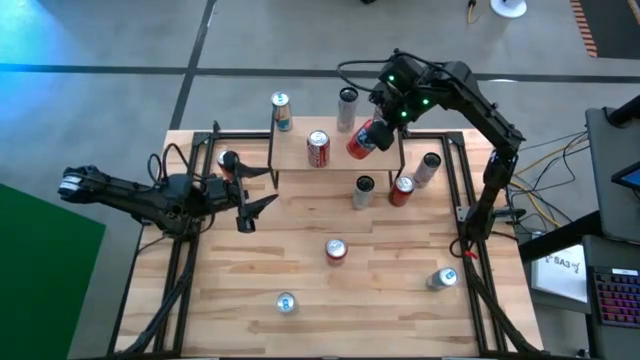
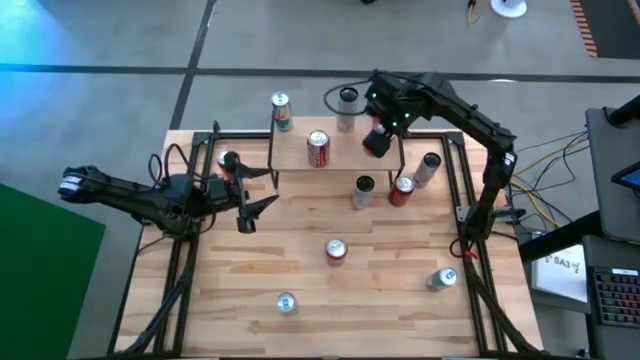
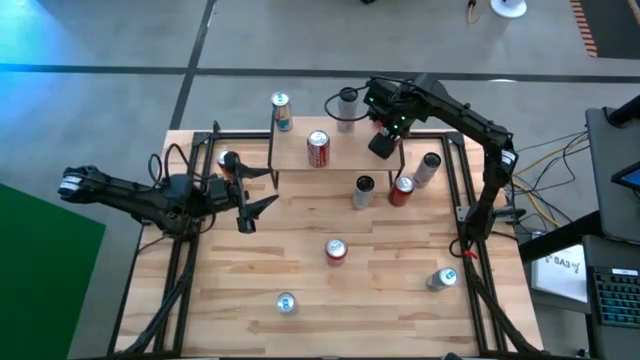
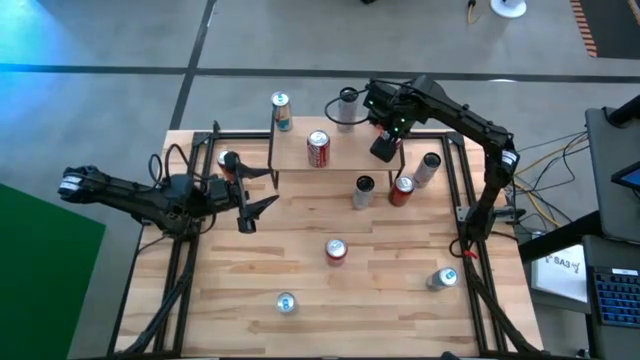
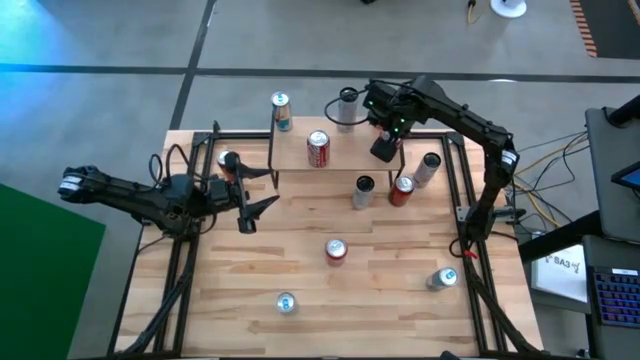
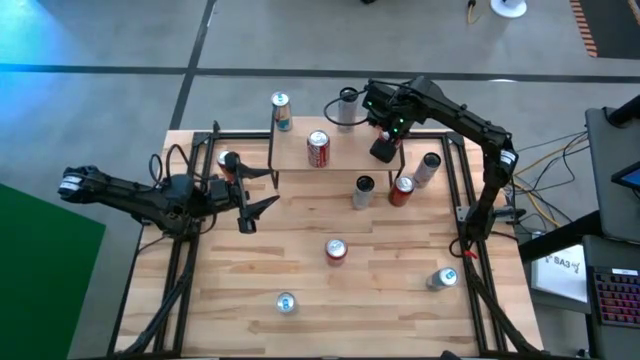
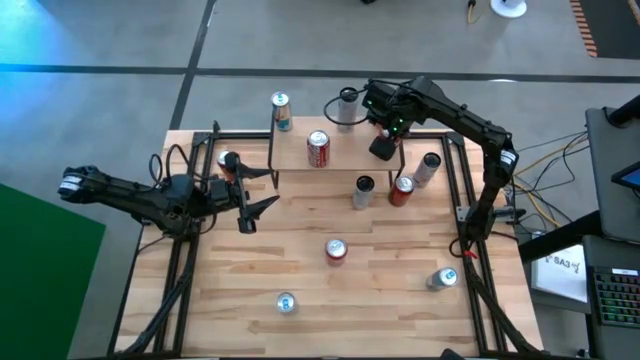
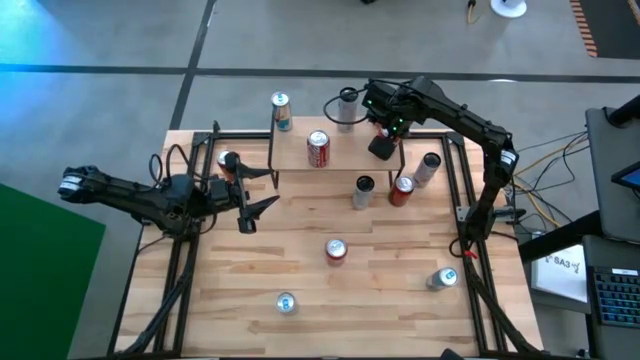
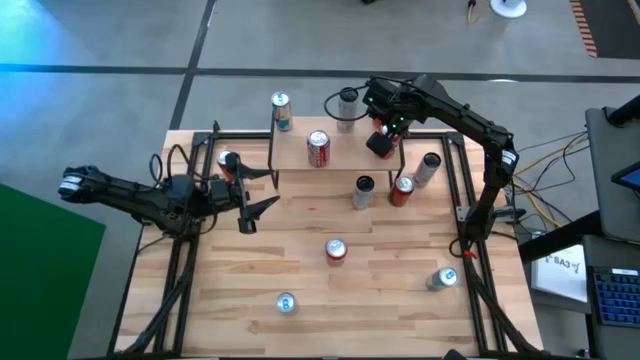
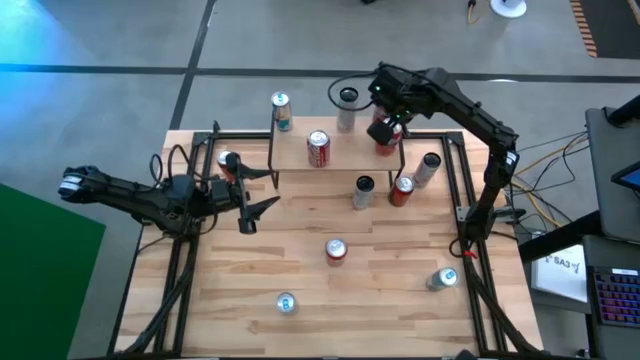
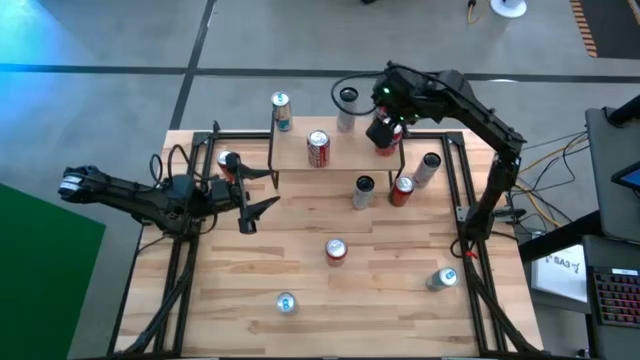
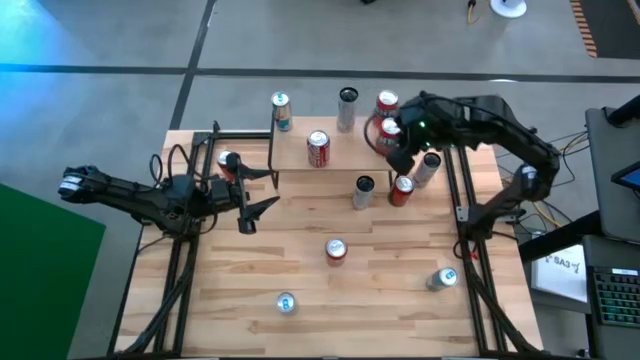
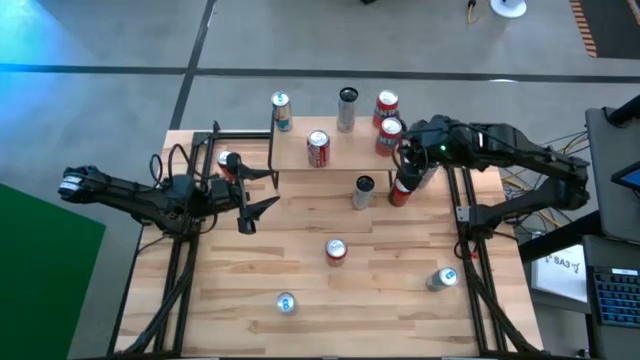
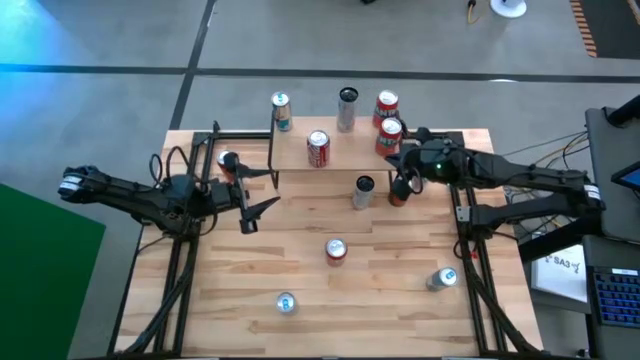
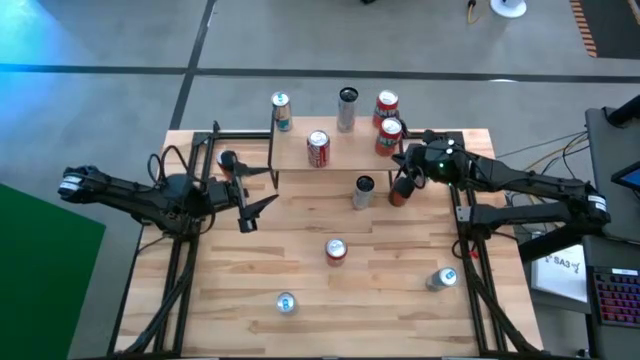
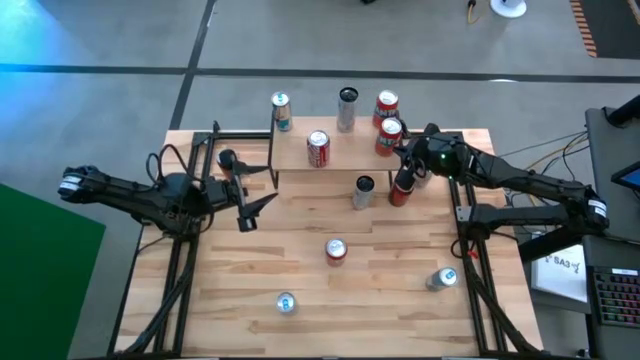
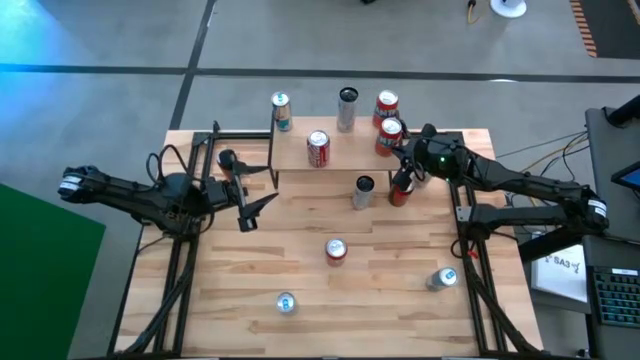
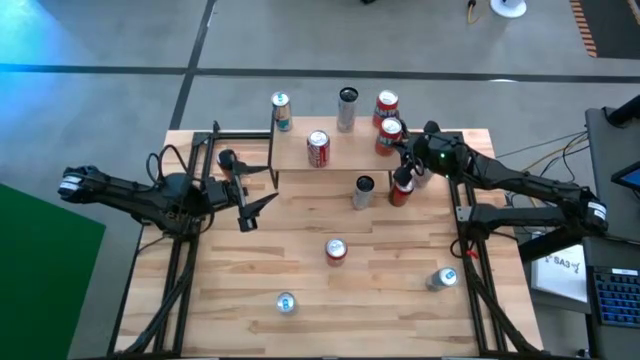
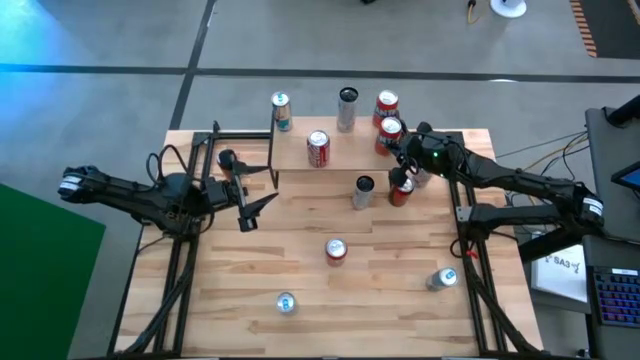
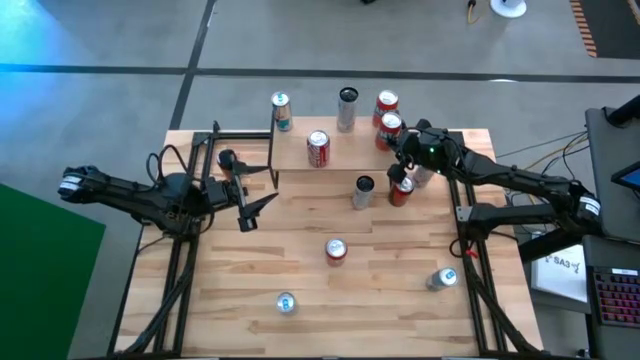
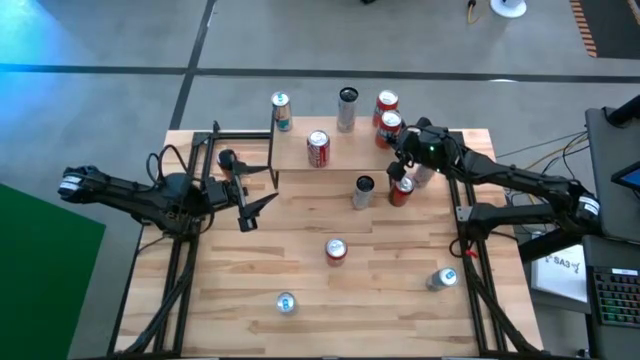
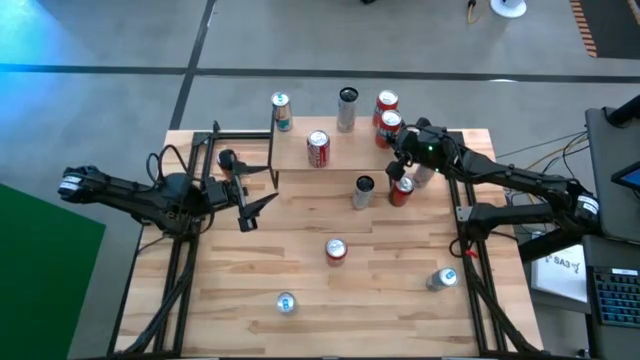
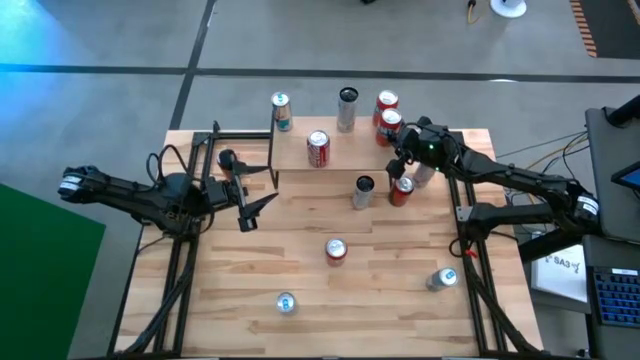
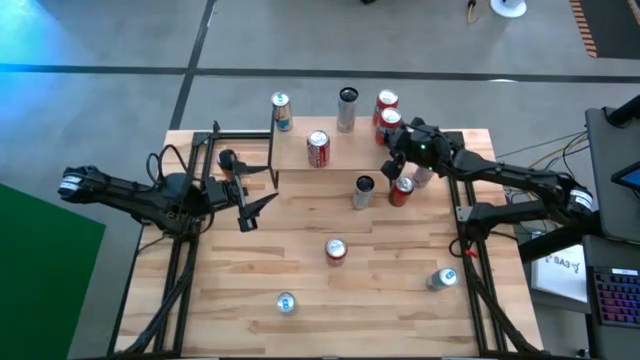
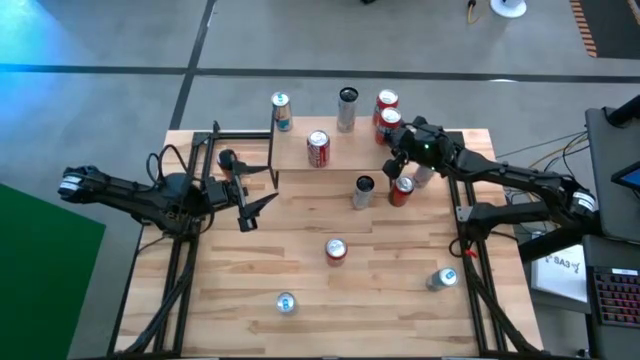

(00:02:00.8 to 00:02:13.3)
Task: Place canned beverage on shelf
Put the bottom red soda can on the shelf

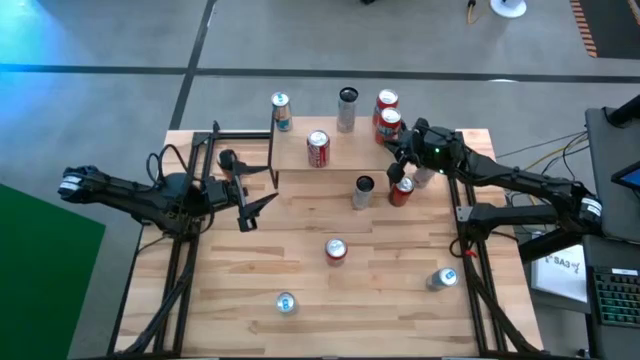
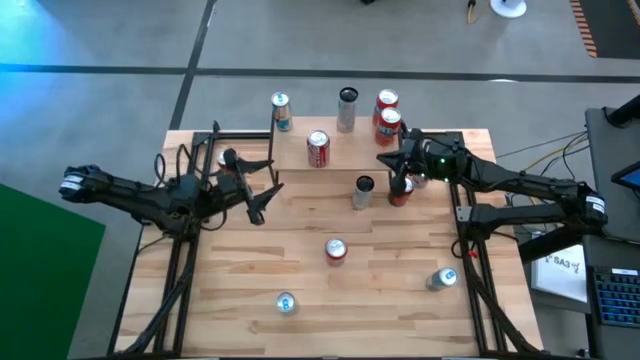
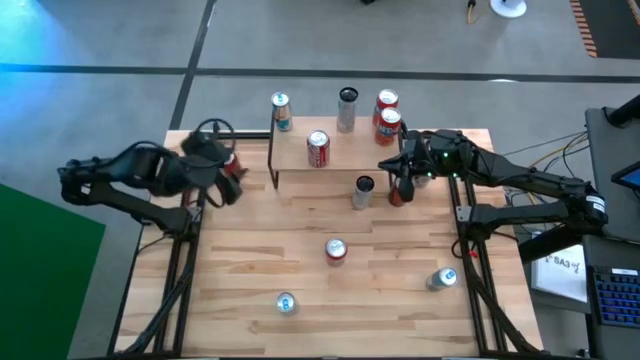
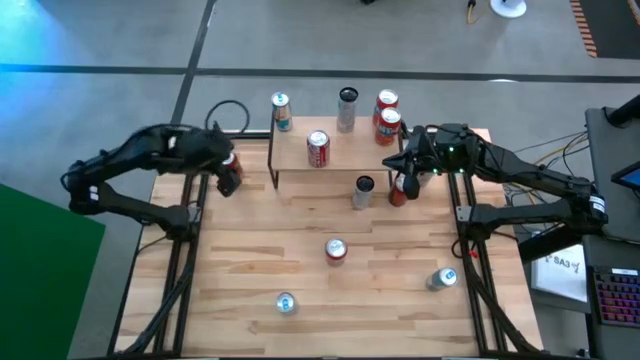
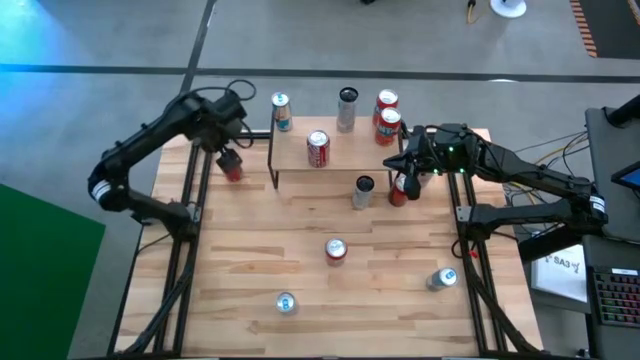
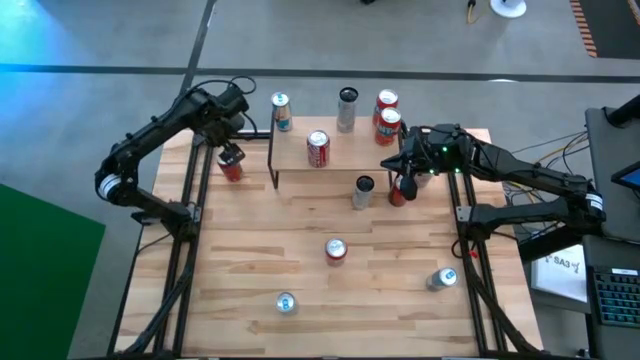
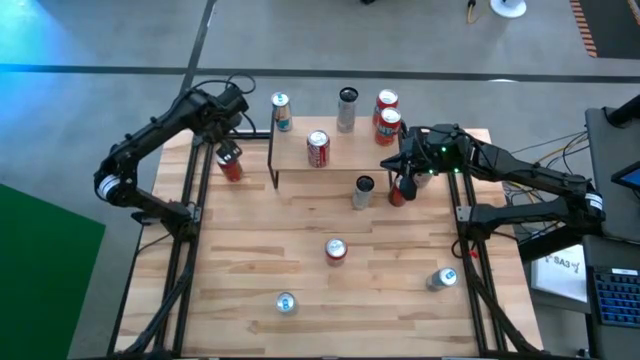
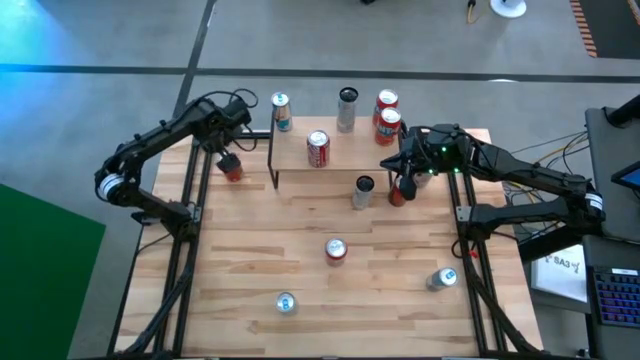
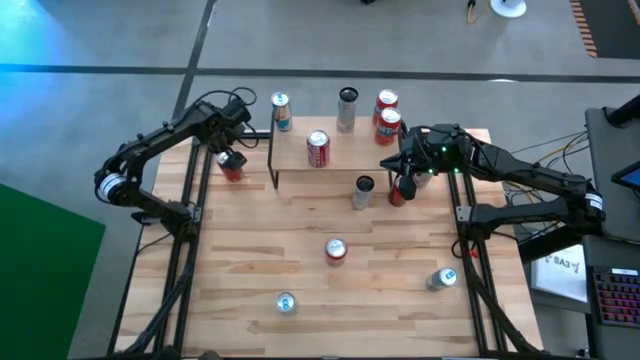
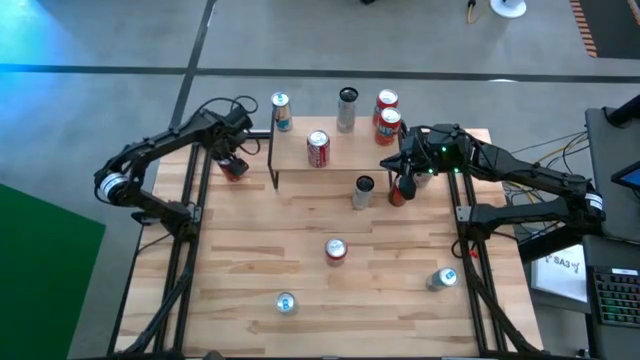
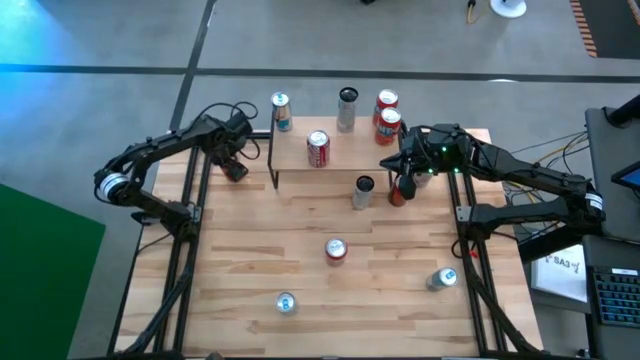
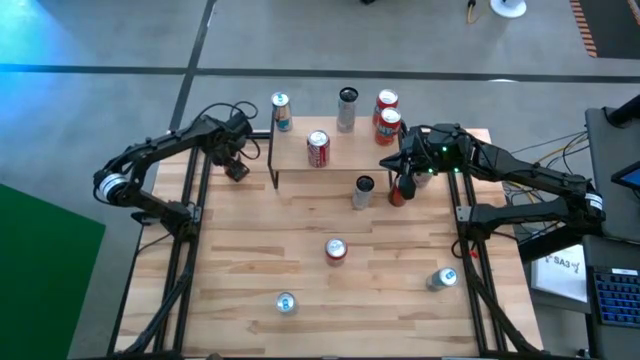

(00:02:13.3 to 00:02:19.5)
Put the top red black soda can on the shelf

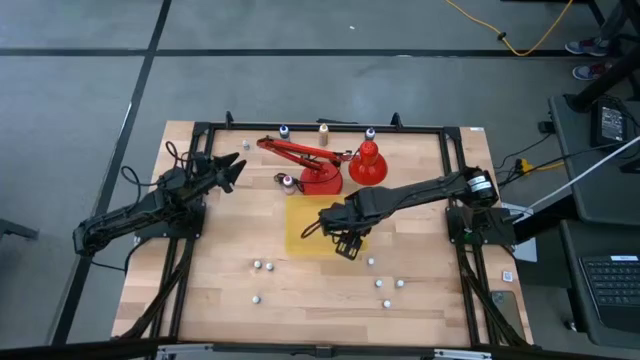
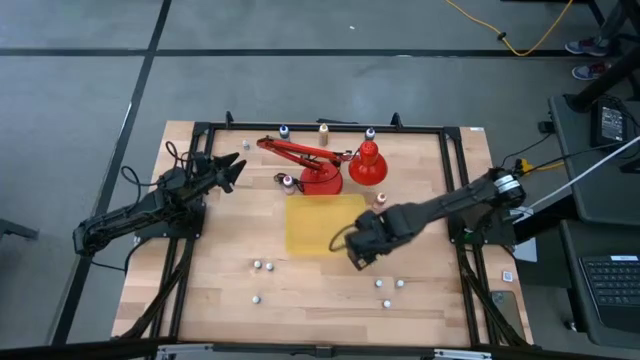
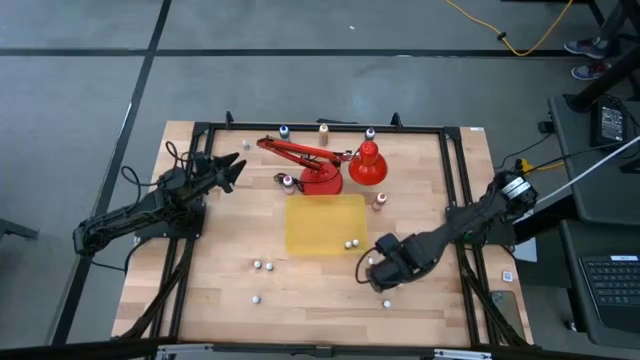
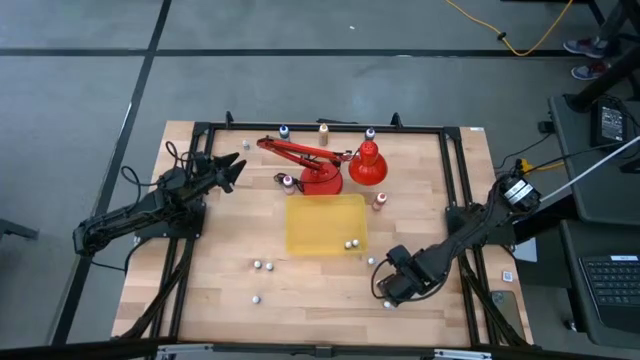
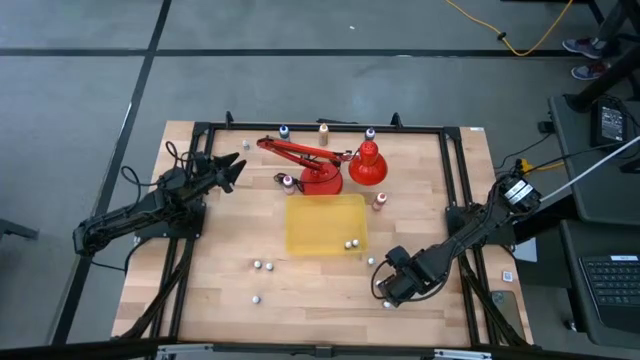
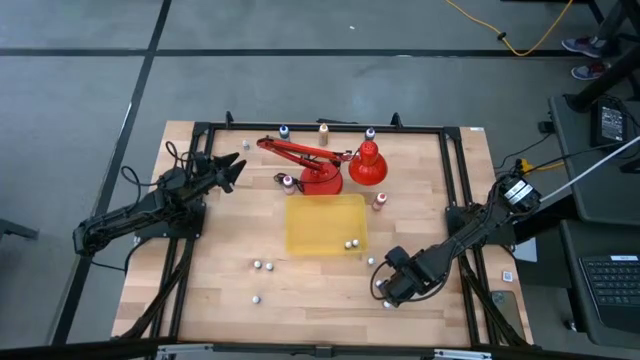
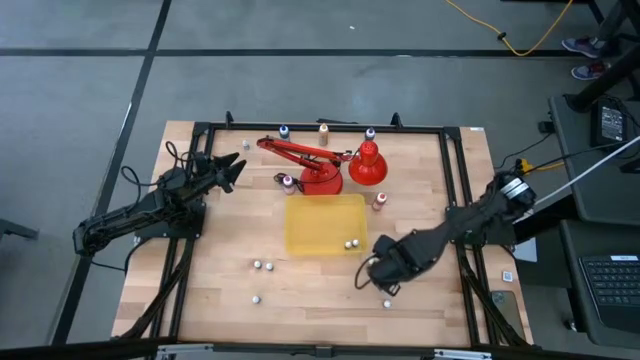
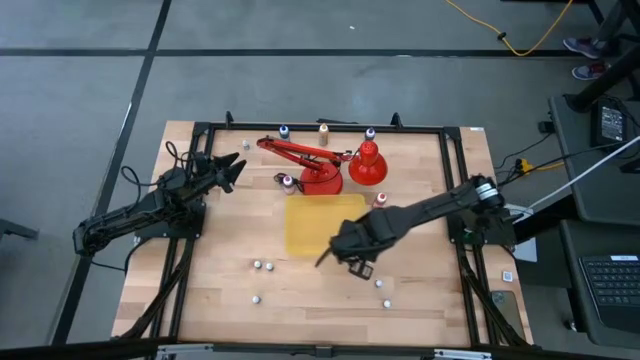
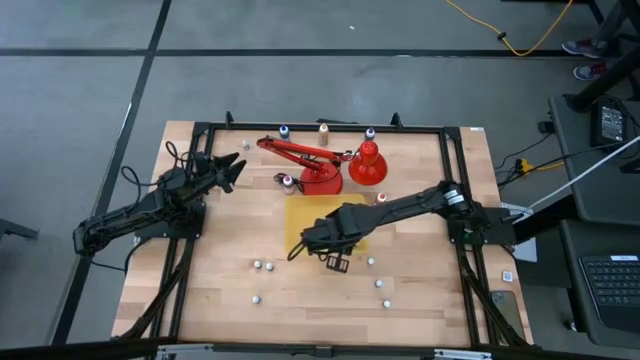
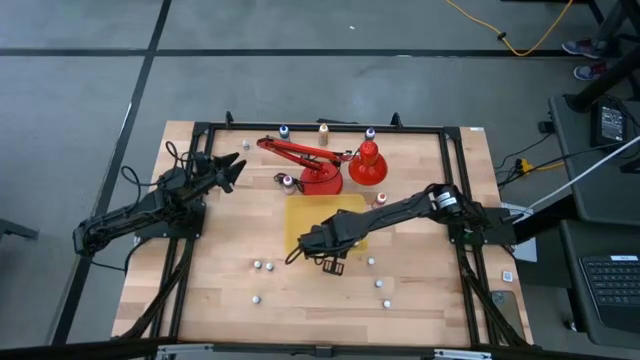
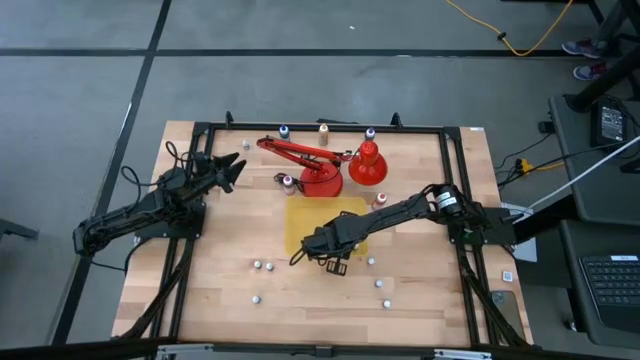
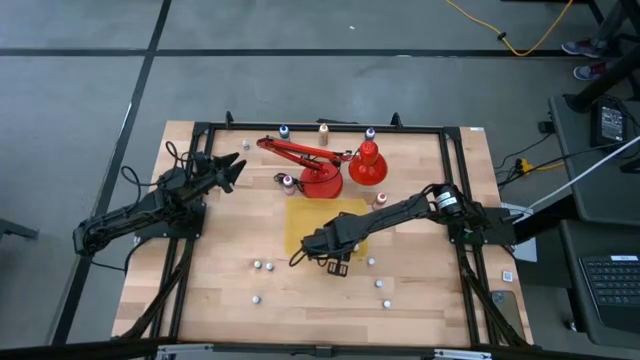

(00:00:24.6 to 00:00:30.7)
Task: Pick & Place food coloring
Put the small blue food bottle into the yellow bin
